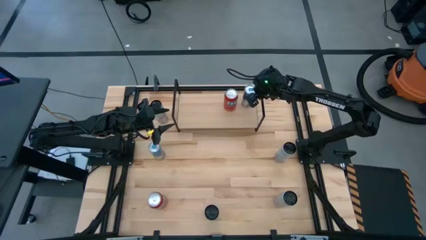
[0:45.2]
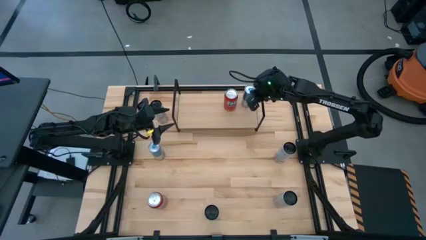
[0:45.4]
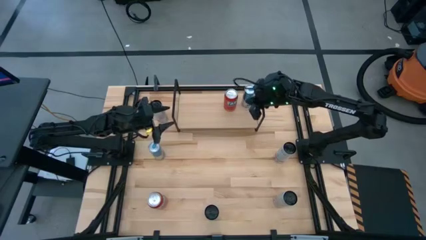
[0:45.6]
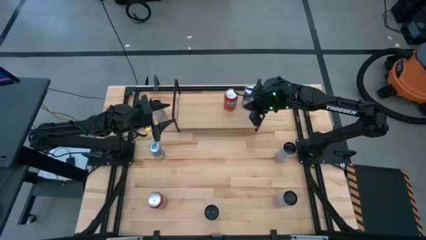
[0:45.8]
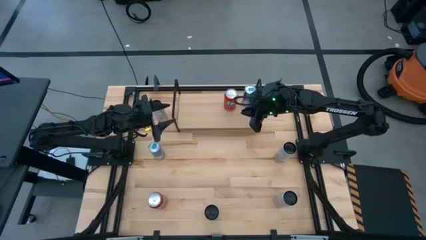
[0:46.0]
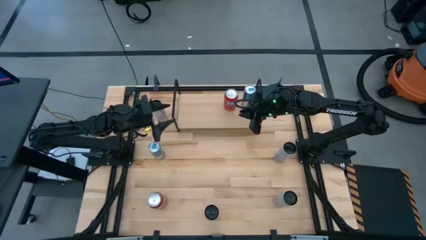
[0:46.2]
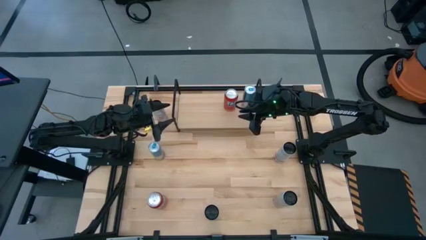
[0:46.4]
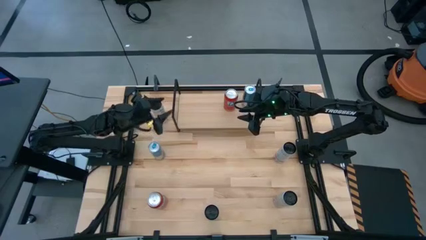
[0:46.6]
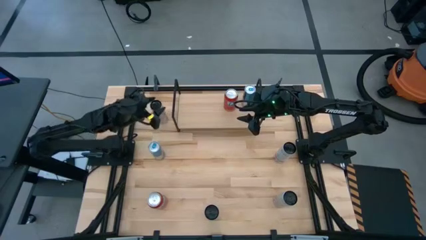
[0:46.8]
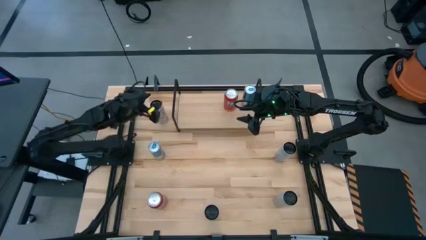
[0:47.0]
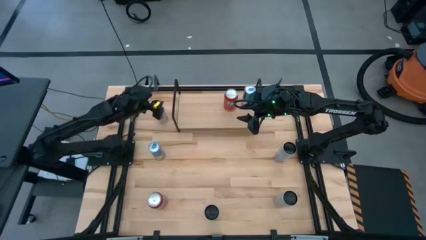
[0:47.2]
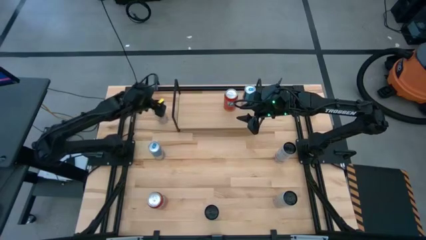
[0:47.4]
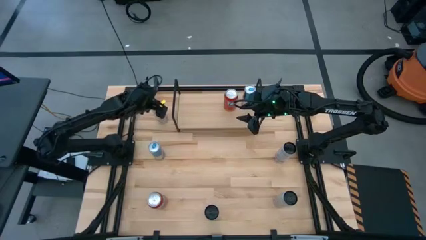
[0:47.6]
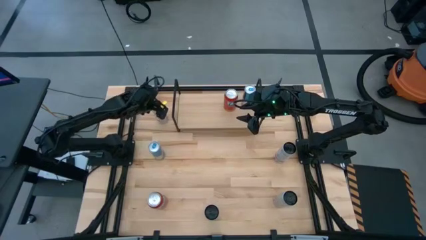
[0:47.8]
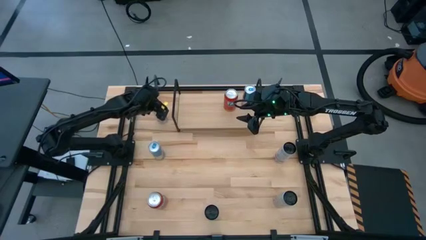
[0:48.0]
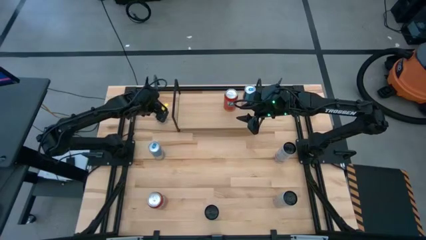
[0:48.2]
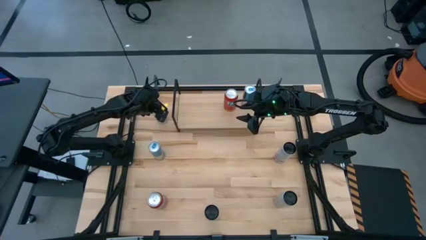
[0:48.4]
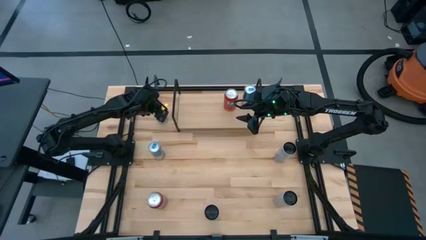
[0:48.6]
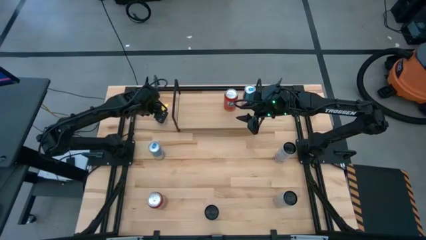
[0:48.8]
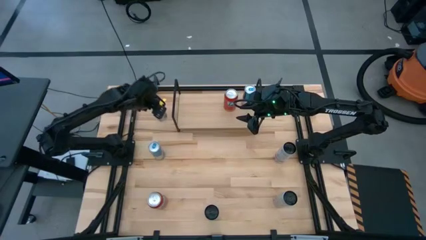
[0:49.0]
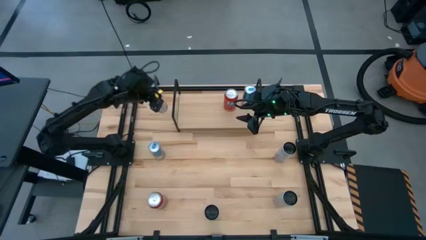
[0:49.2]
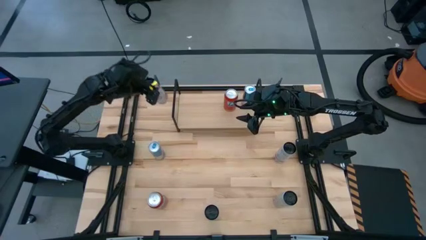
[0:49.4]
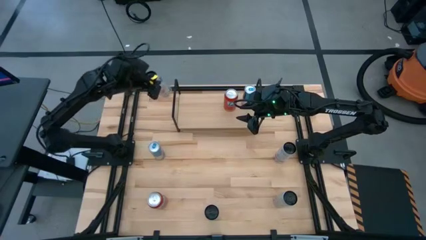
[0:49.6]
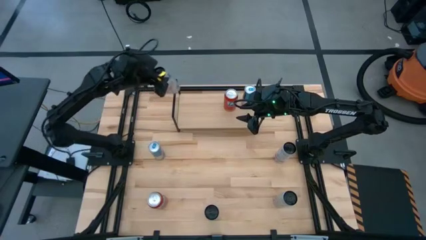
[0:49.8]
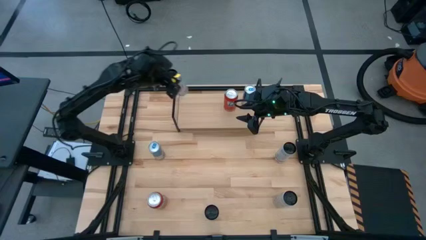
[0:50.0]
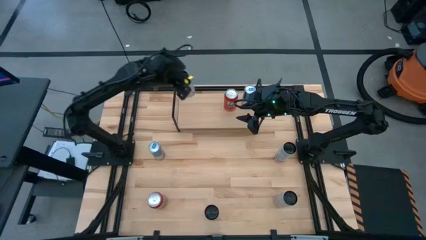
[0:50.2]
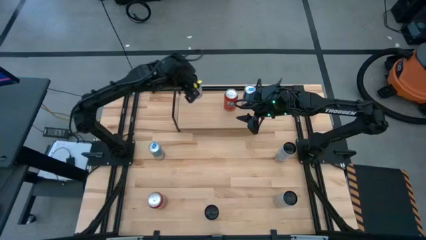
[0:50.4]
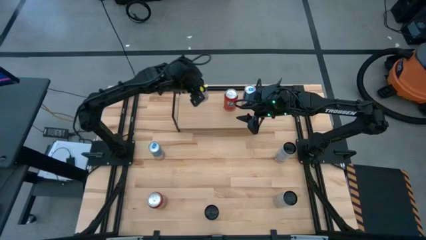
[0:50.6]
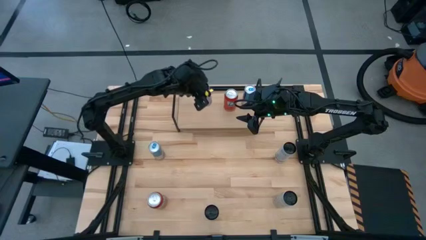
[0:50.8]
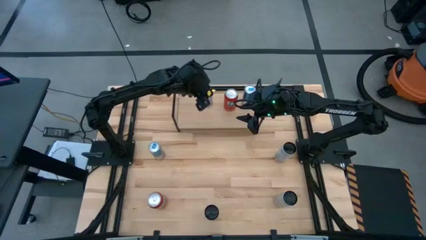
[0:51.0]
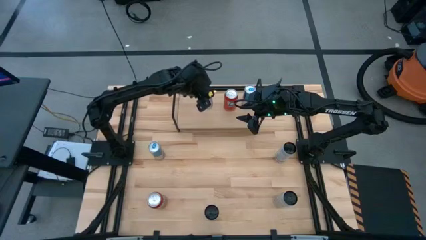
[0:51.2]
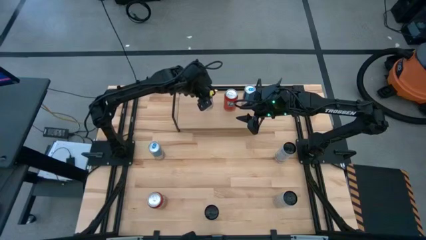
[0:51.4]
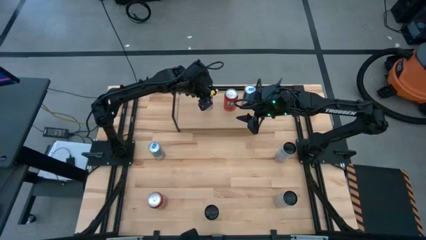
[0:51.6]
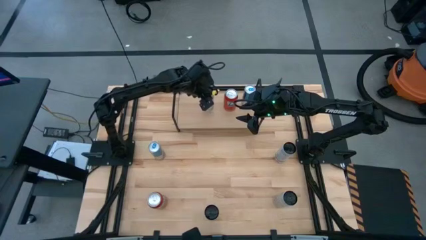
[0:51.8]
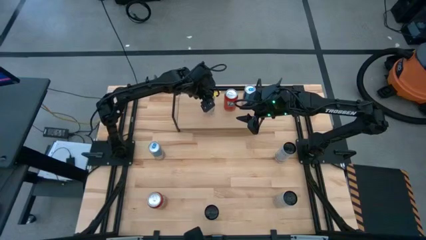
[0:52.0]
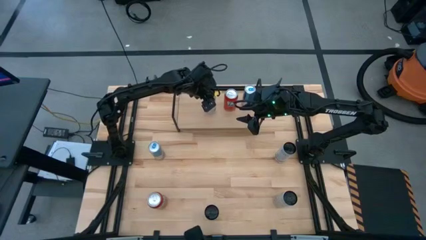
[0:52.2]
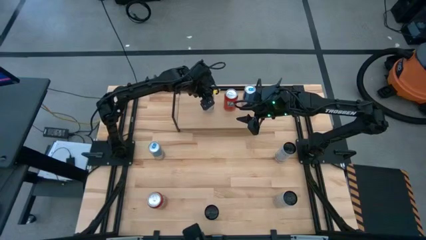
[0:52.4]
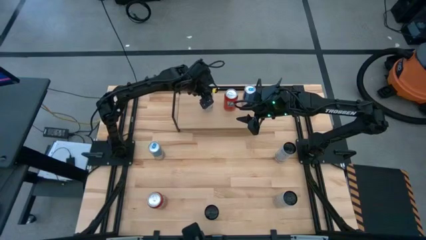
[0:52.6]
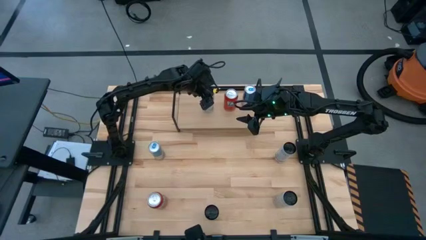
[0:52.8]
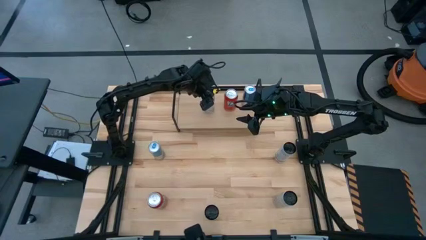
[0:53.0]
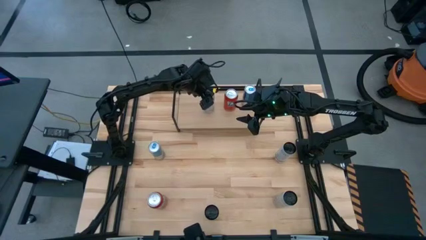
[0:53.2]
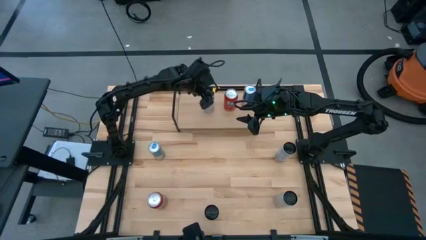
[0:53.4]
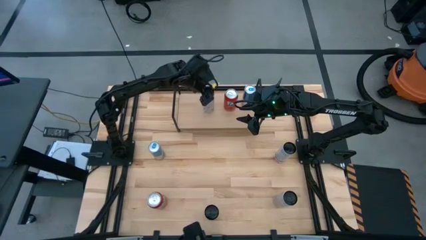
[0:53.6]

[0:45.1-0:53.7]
Task: Place canned beverage on shelf
Put the top white and pink soda can on the shelf

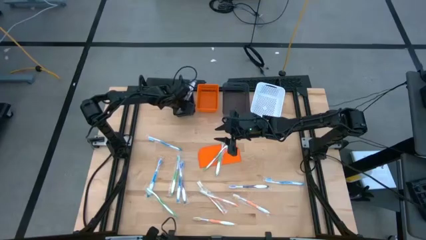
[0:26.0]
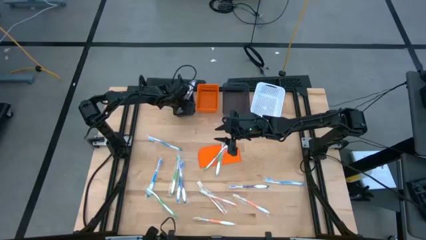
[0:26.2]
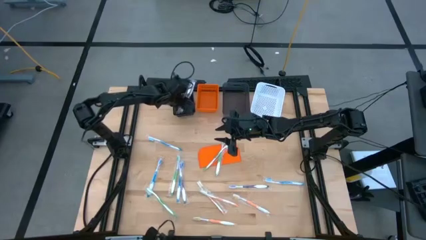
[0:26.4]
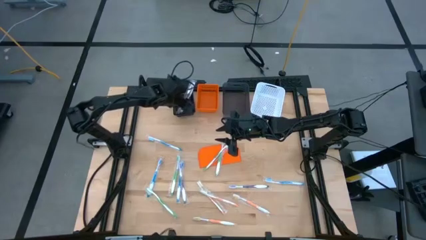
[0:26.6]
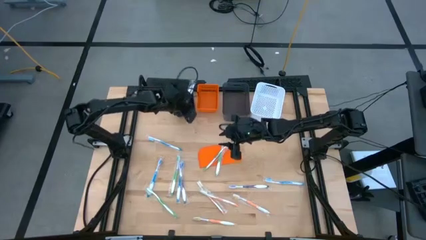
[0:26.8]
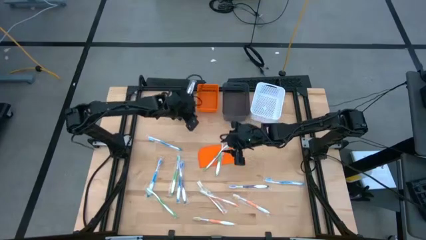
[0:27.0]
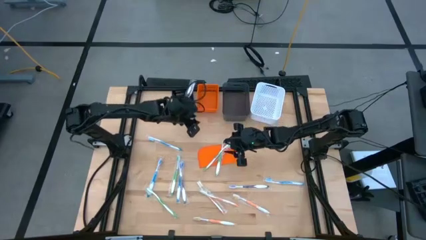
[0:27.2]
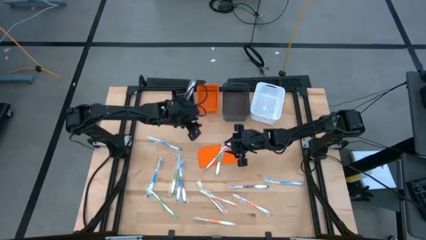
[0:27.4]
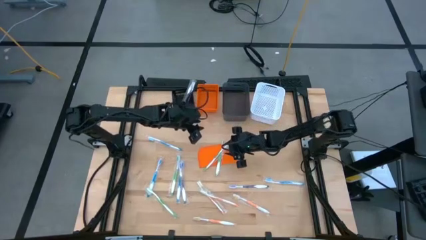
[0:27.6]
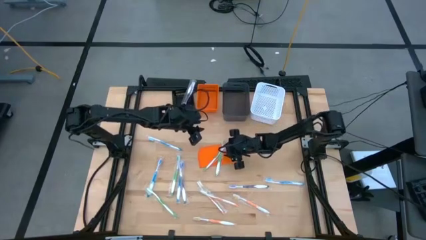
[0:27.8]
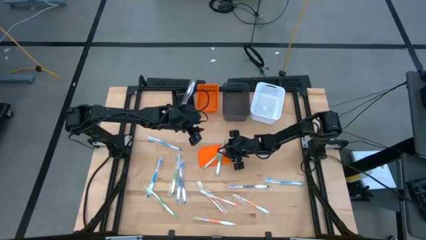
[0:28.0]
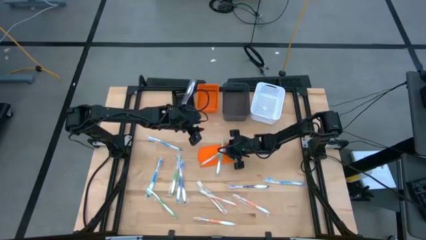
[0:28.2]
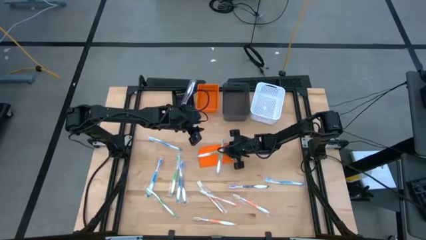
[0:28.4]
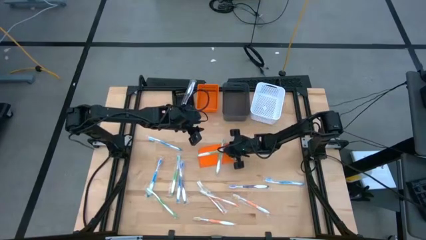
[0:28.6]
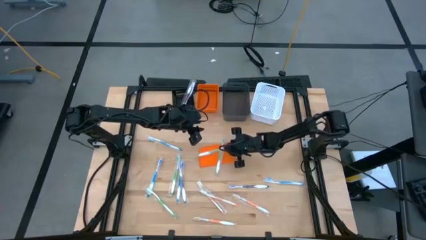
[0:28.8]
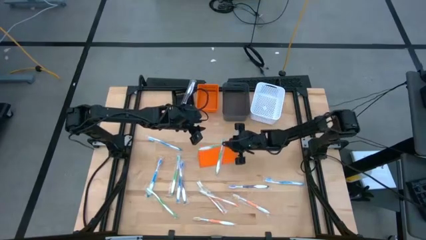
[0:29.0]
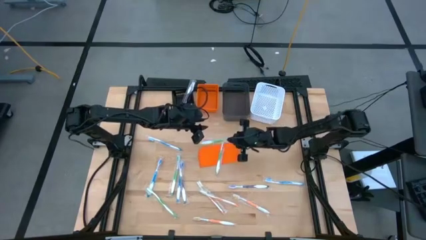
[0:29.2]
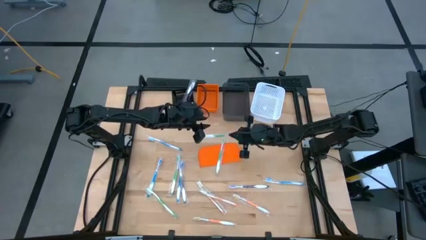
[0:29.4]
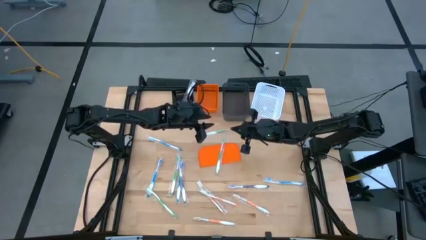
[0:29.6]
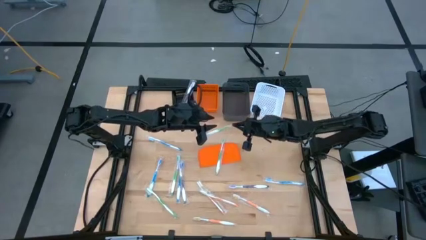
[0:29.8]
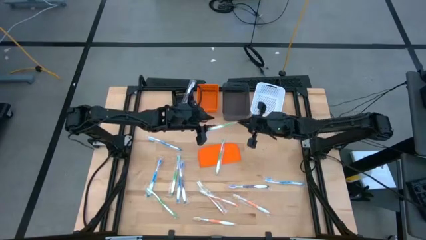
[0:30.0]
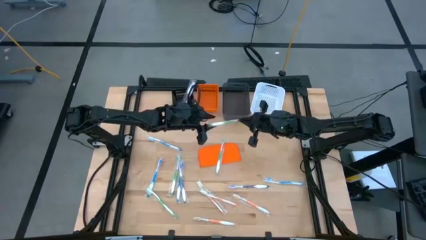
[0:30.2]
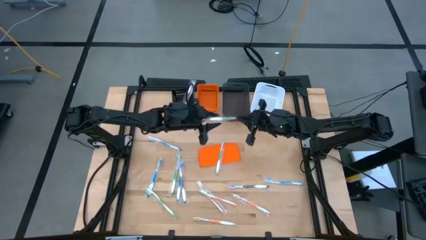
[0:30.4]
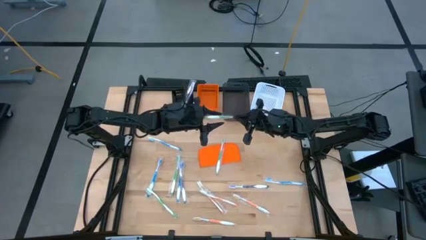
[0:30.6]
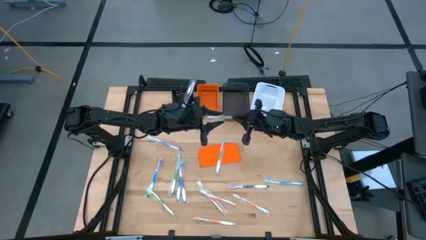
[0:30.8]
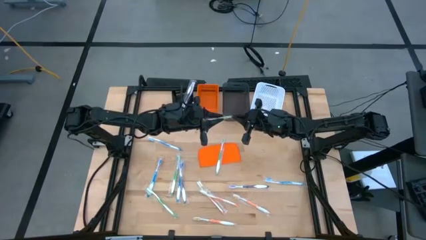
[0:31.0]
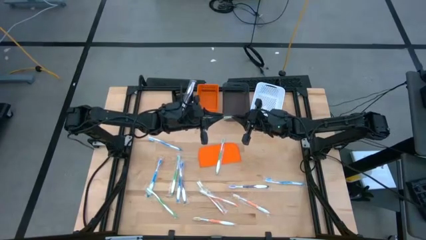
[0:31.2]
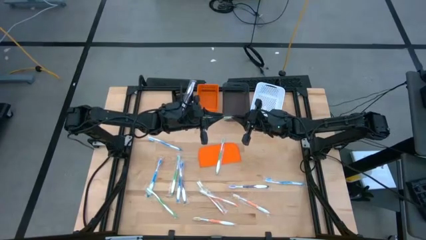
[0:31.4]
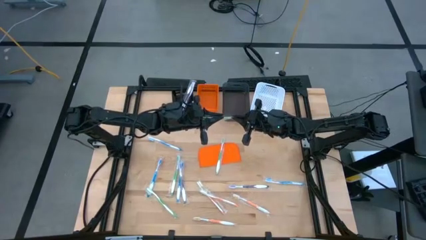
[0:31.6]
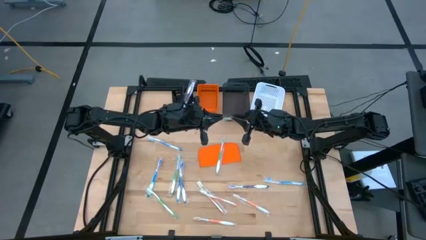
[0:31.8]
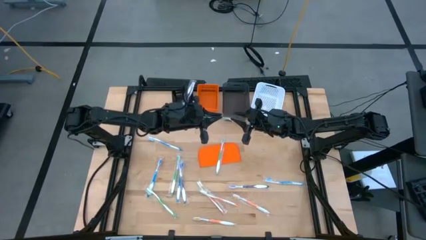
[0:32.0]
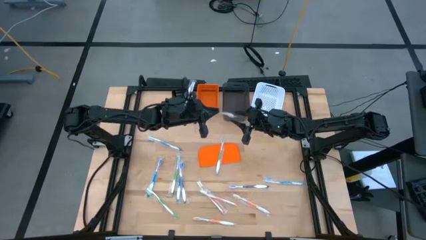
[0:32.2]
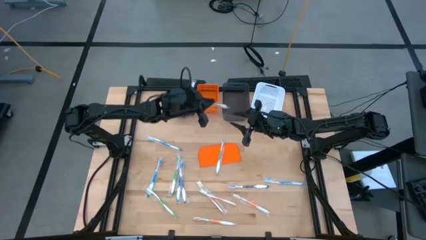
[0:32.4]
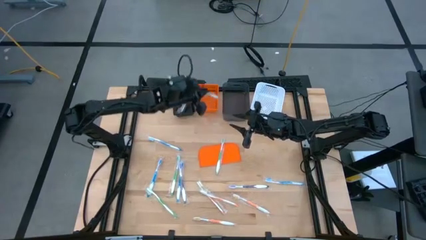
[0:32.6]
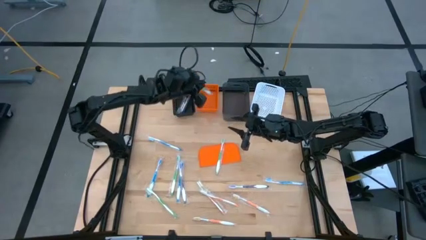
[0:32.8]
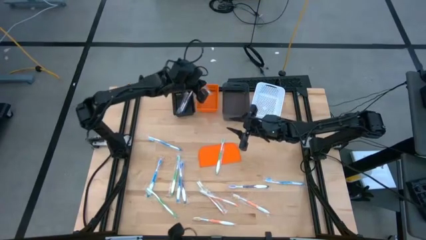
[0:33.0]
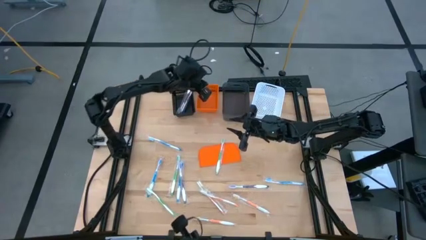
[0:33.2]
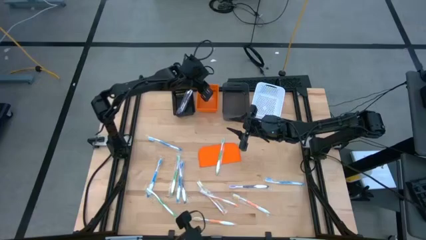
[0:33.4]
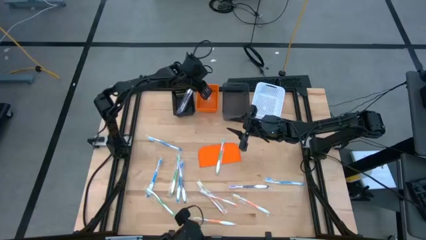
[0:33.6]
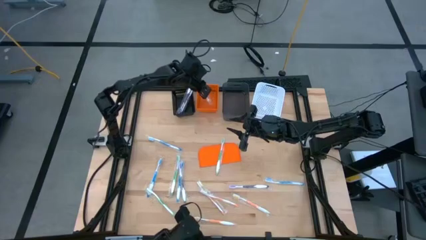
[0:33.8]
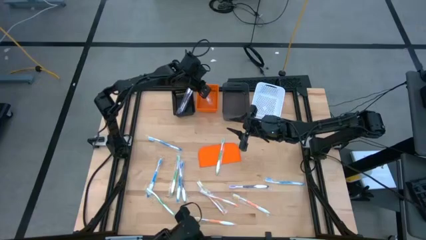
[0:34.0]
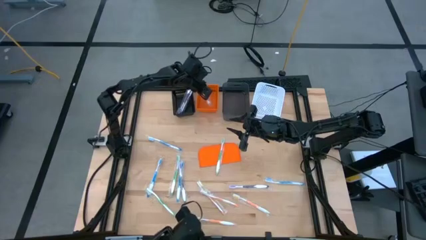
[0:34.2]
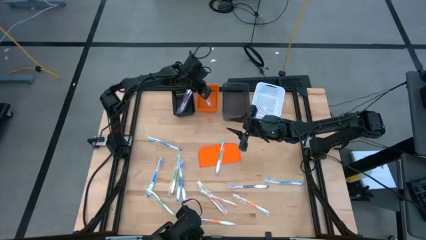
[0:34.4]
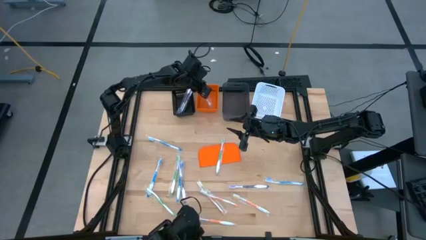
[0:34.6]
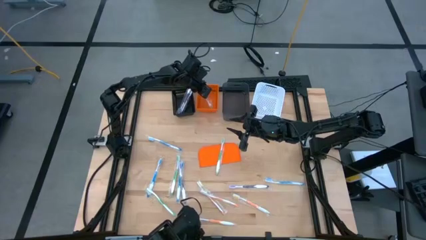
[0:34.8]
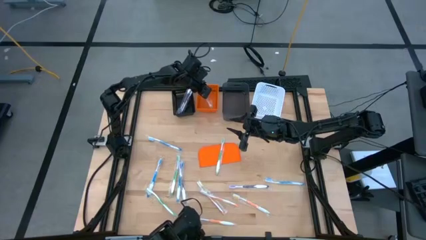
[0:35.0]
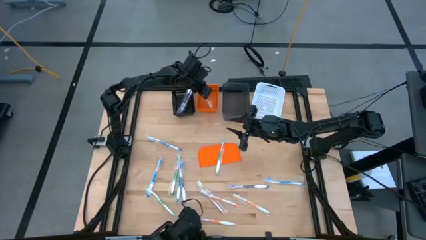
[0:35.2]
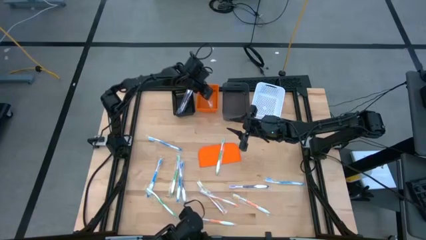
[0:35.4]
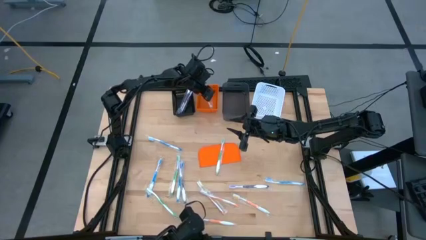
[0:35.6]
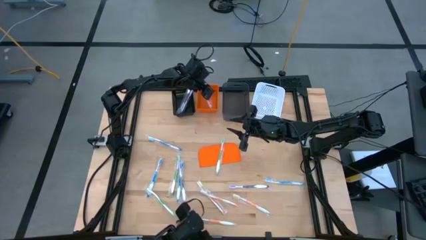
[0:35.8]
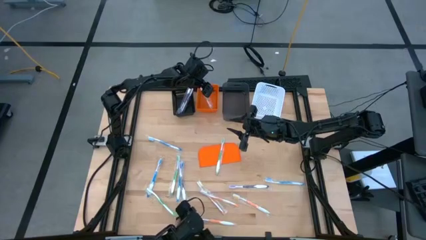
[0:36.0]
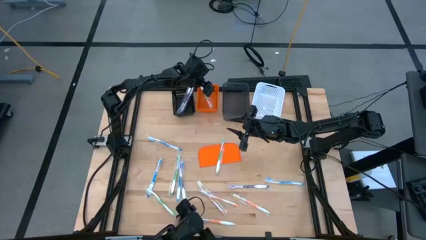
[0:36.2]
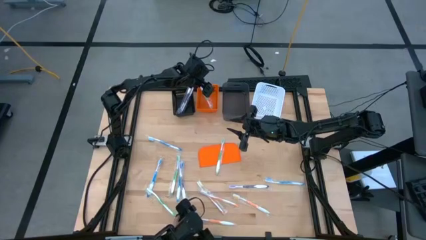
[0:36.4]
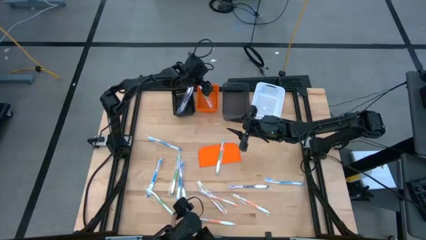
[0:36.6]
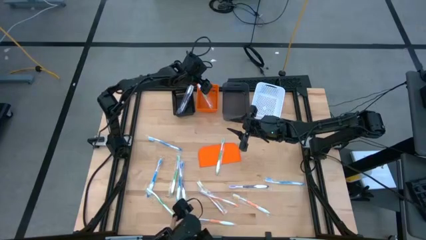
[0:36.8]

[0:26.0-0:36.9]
Task: Pick & Place Toothbrushes
Put the green toothbrush into the orange bin
